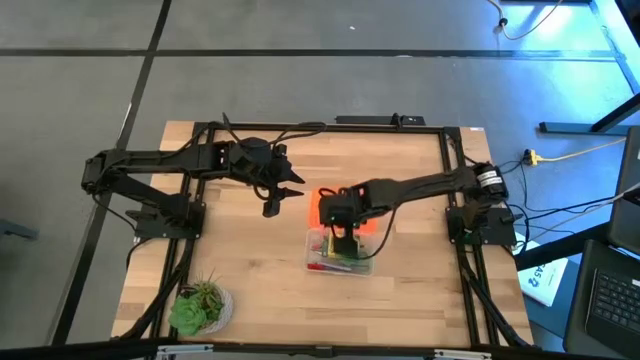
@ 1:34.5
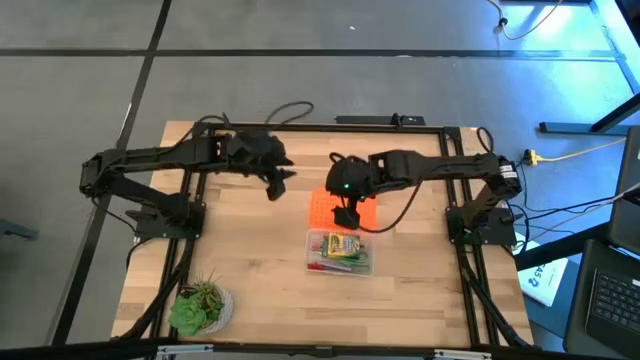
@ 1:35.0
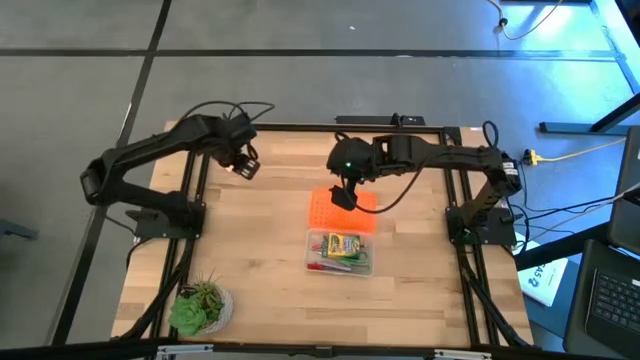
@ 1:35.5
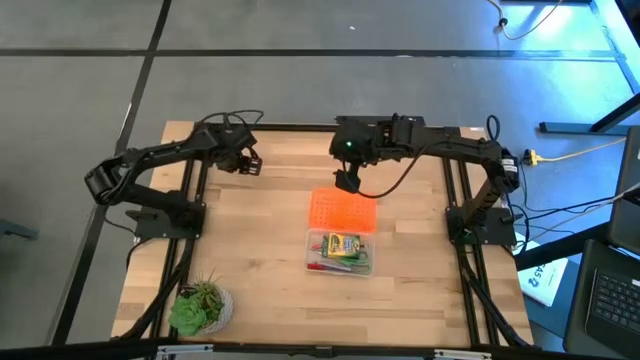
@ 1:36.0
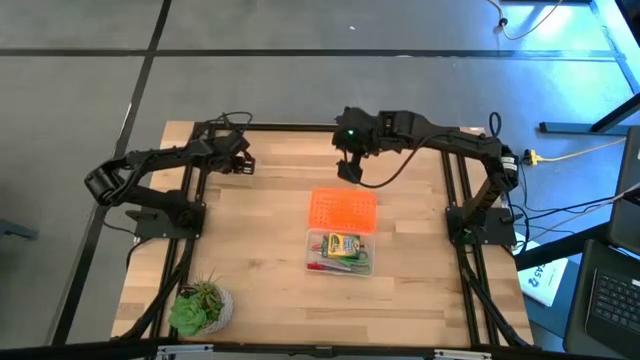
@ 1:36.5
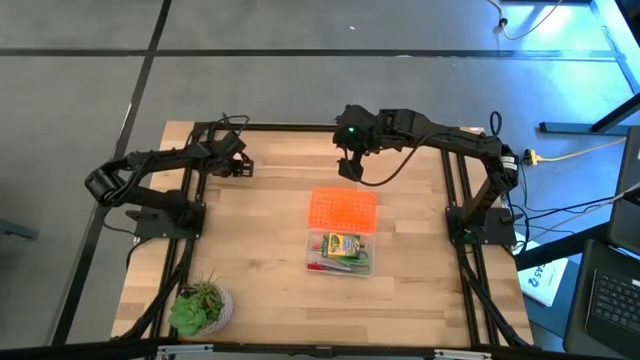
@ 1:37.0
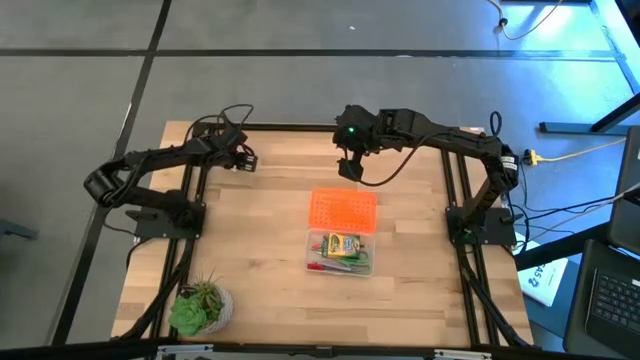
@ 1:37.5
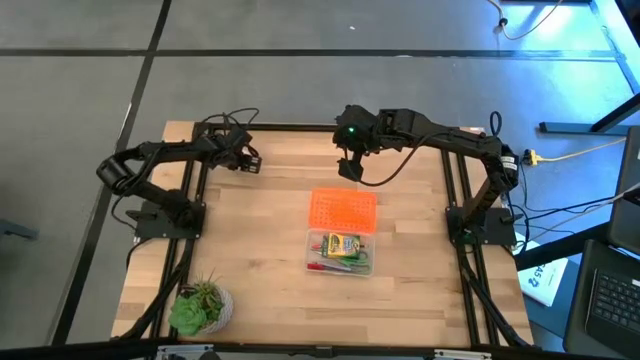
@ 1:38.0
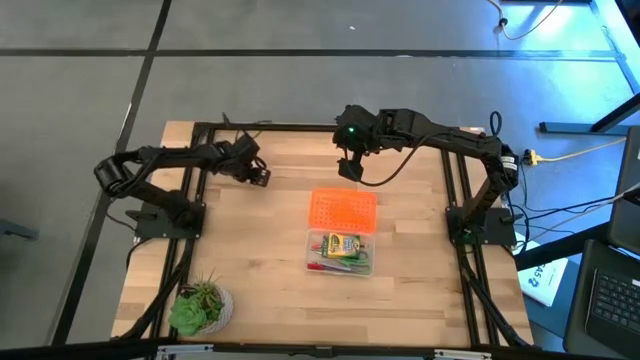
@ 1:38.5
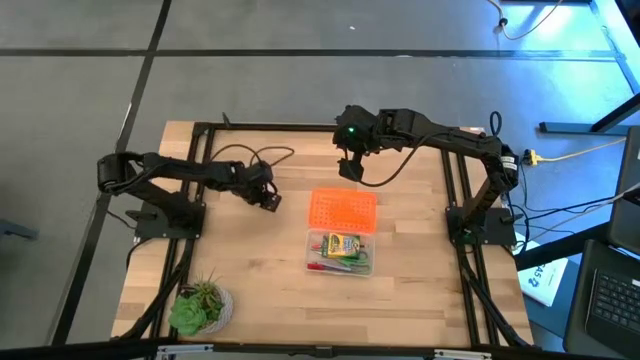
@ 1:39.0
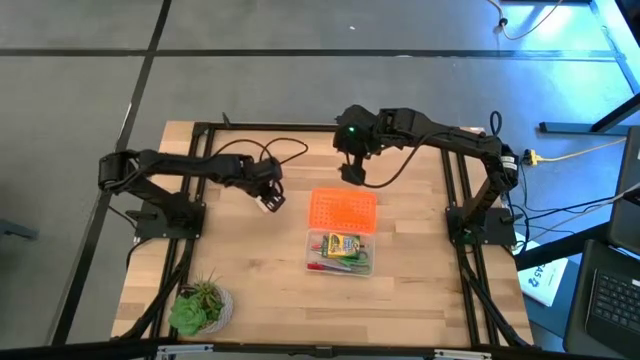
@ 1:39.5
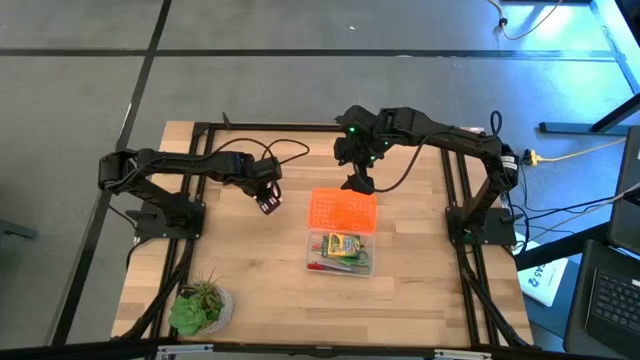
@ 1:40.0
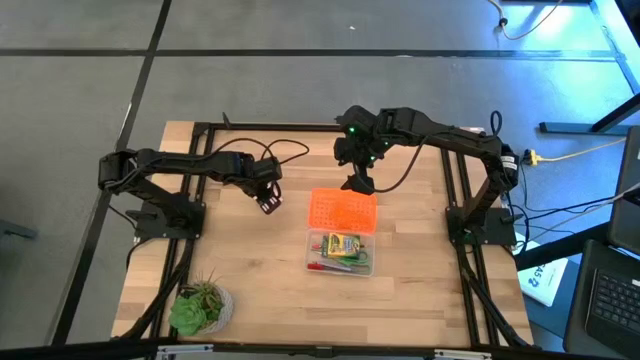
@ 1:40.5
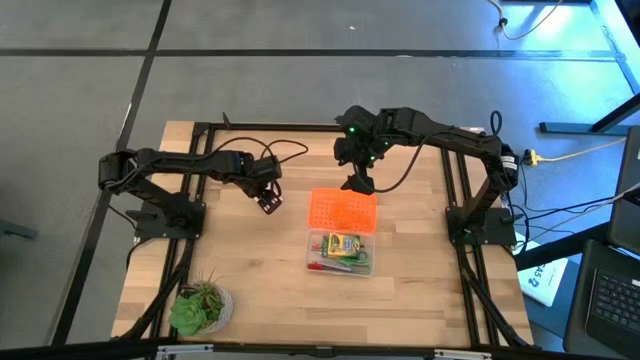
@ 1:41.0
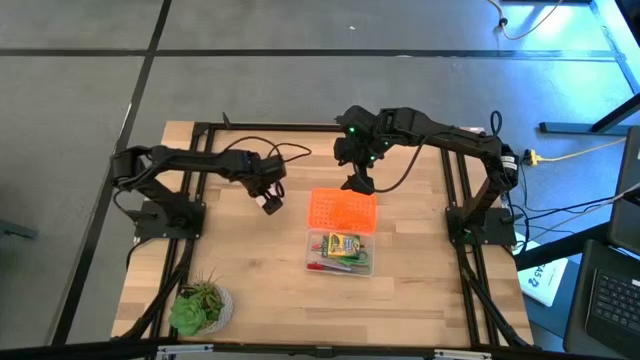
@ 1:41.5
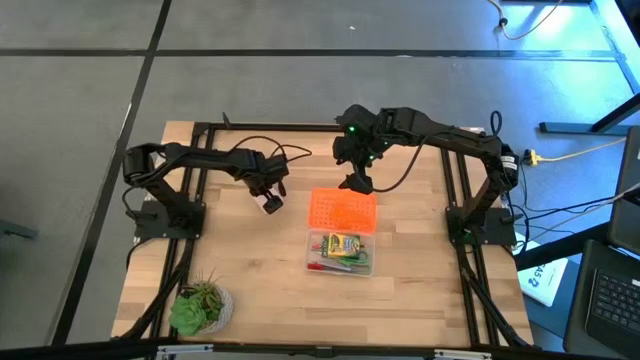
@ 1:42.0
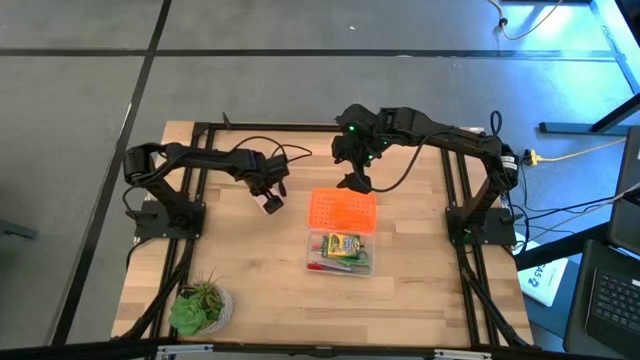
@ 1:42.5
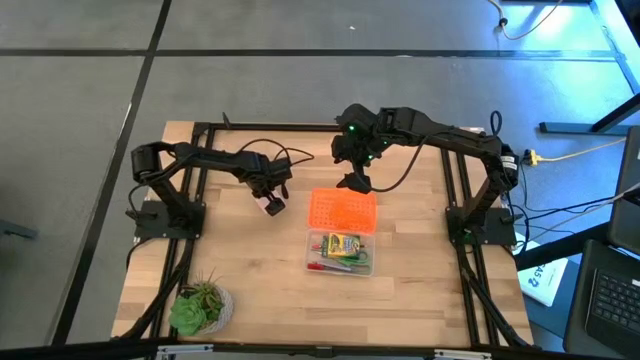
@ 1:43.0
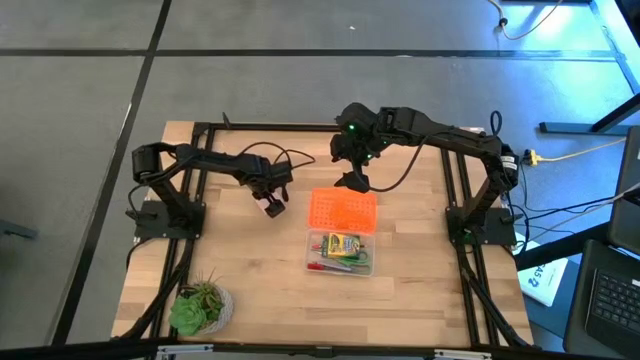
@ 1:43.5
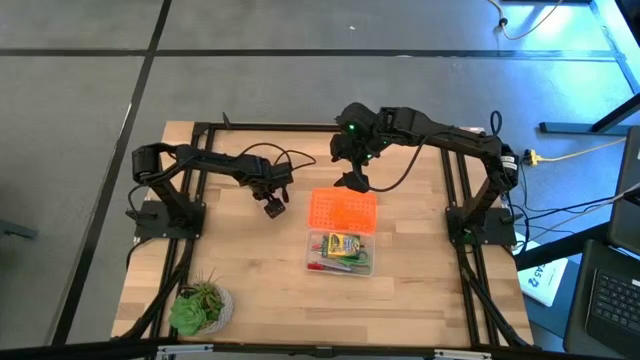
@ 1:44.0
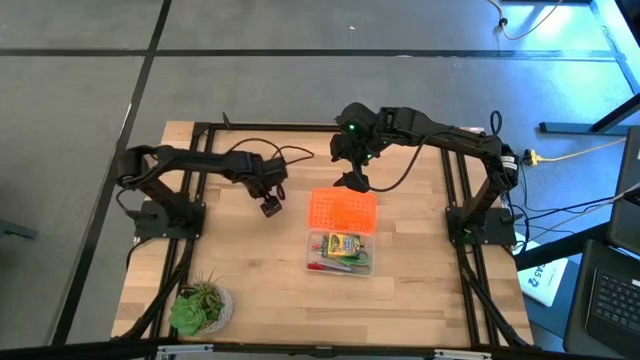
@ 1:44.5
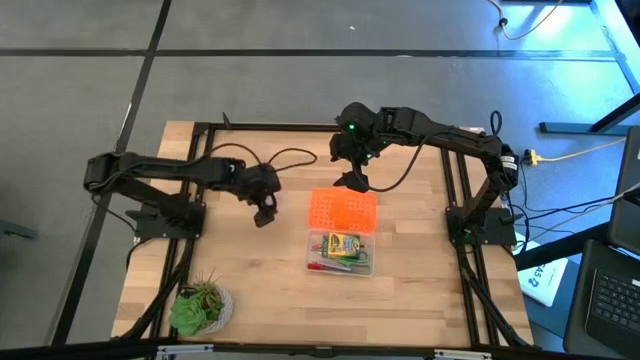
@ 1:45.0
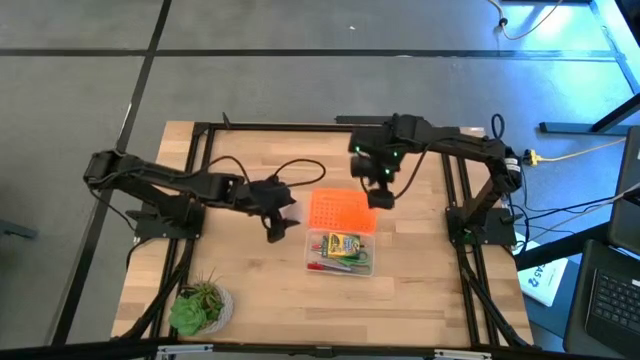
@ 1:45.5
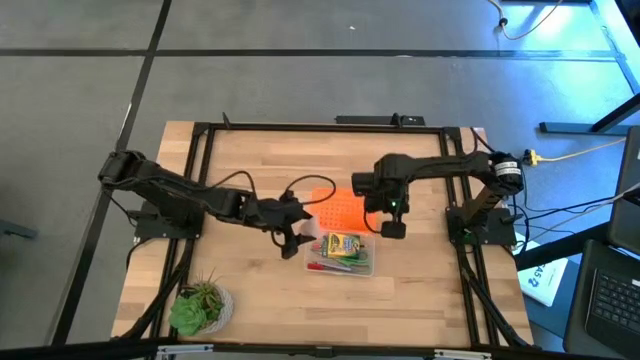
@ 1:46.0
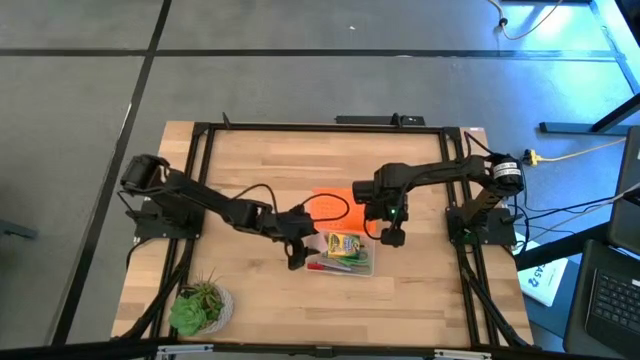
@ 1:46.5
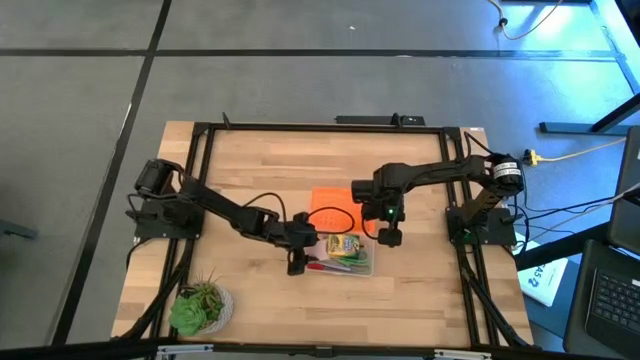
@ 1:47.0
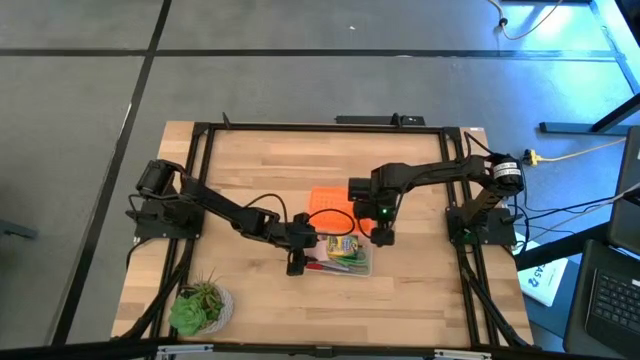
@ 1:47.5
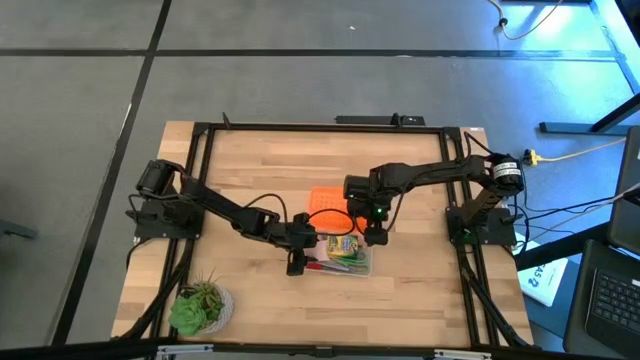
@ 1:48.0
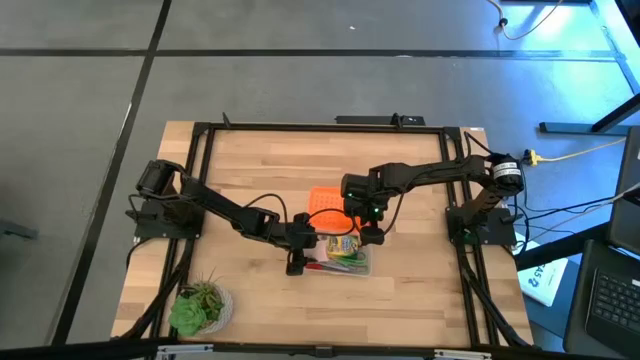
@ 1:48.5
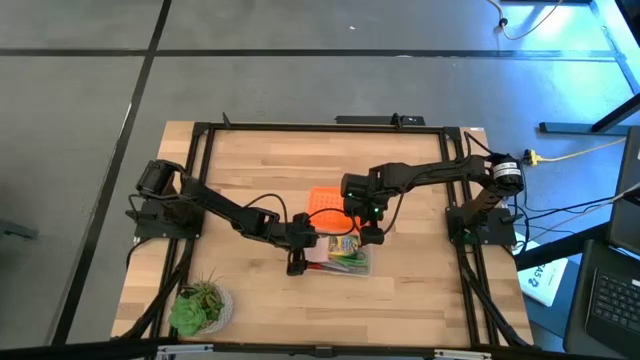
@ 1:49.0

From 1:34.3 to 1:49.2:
Task: Pack school essentials
Put the white sticky notes into the orange supply box

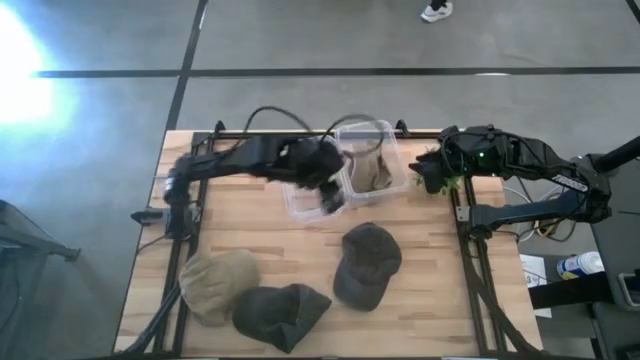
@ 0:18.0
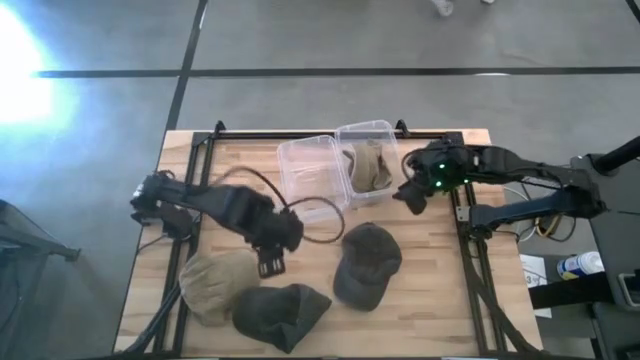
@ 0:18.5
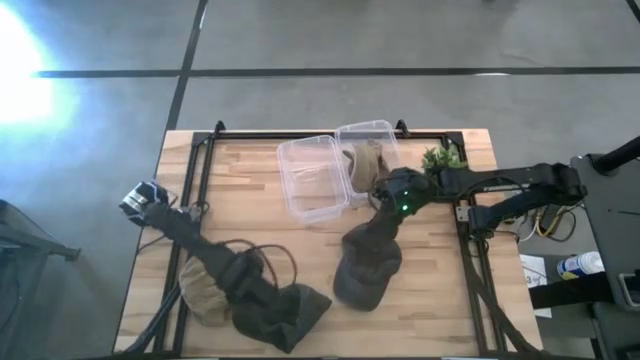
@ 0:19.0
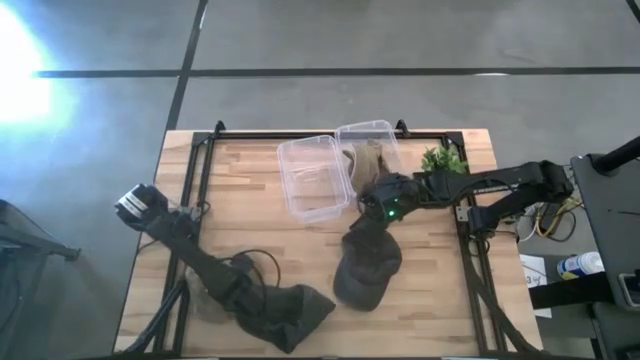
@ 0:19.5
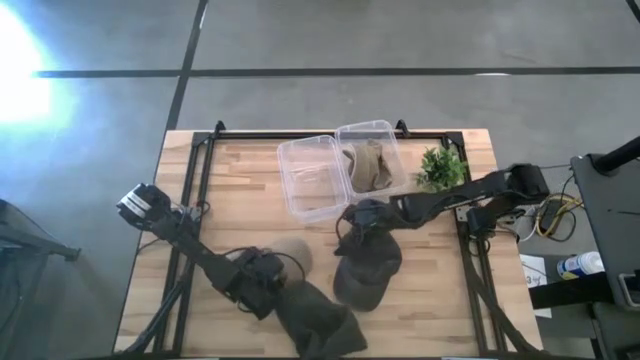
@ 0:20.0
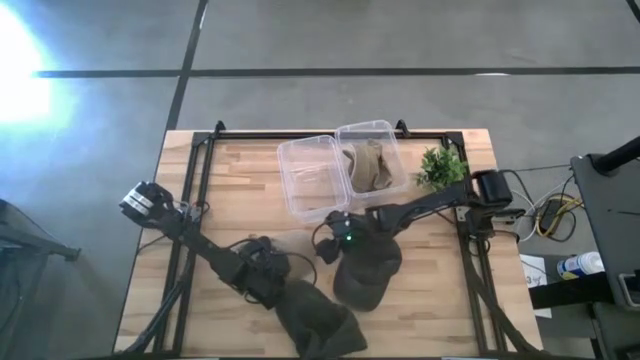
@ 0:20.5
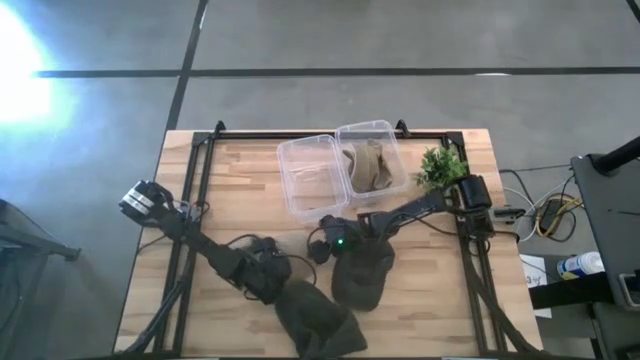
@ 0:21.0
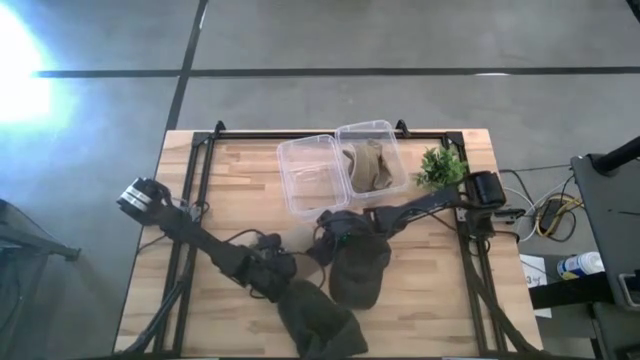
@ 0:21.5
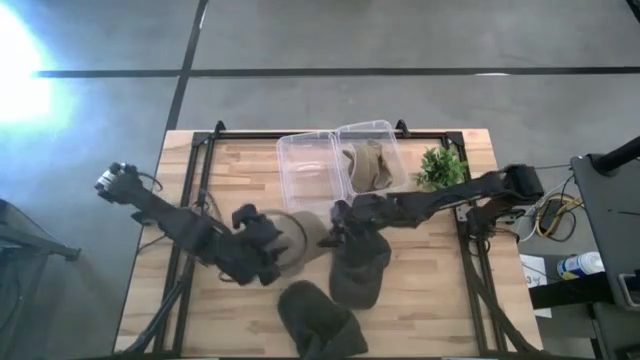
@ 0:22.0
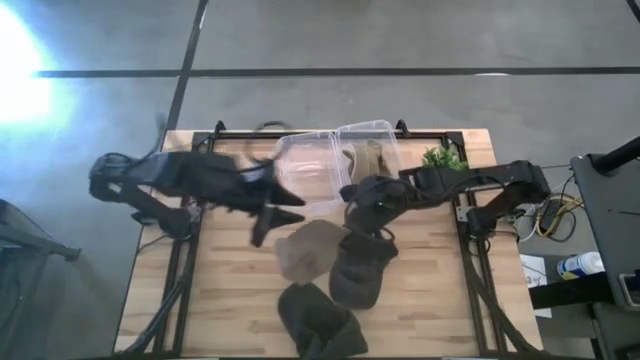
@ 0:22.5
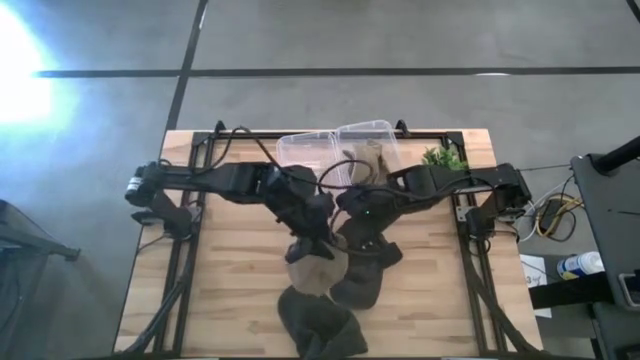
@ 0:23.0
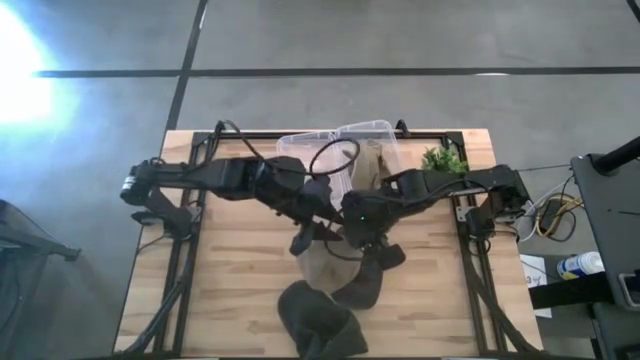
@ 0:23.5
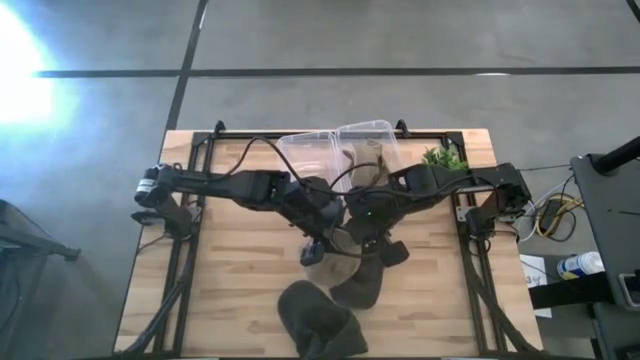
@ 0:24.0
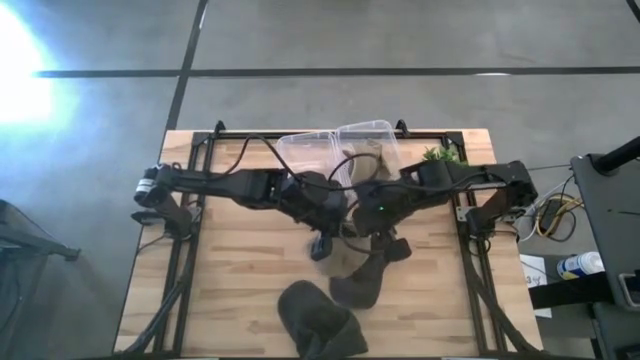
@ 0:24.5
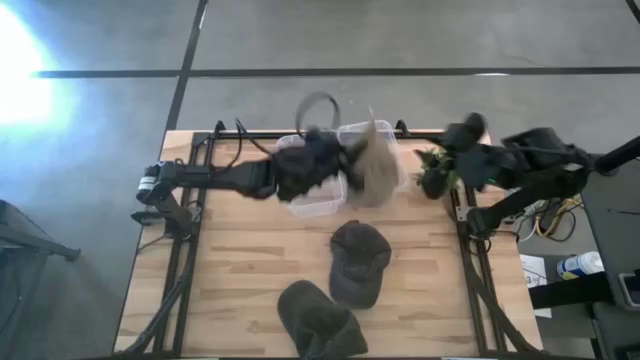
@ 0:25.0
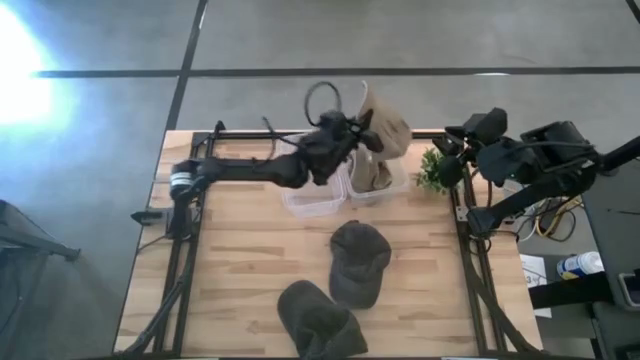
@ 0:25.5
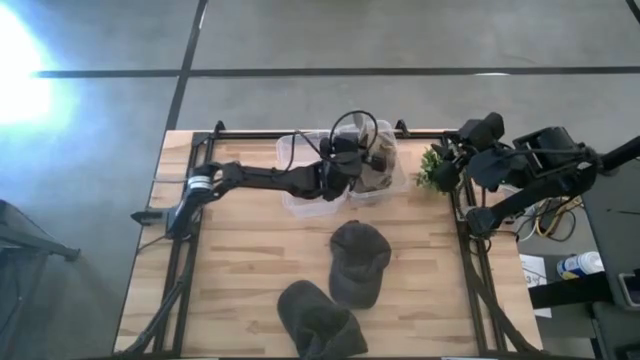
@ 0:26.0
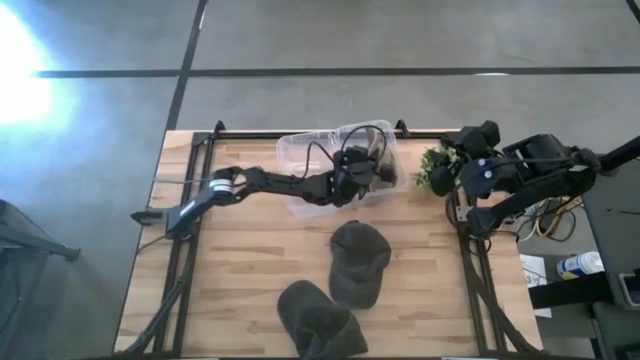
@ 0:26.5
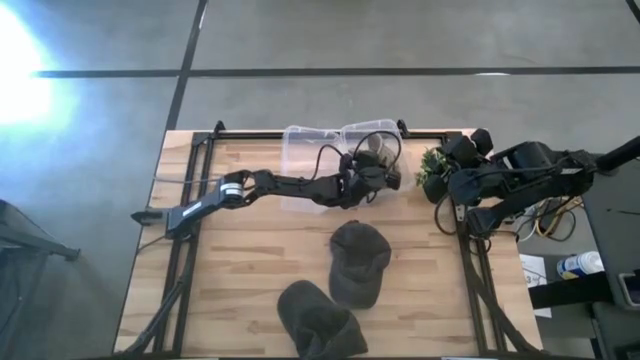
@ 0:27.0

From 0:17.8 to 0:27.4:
Task: Pick & Place hat
Put the brown cap into the right transparent bin
